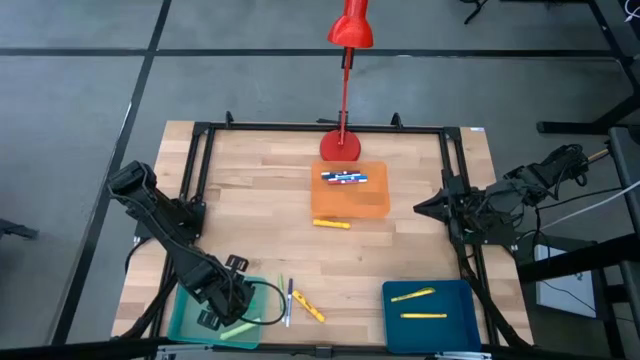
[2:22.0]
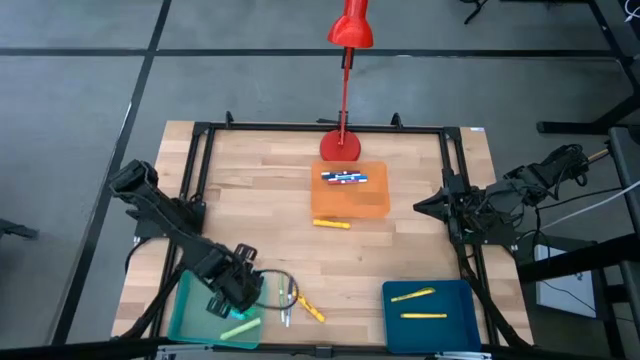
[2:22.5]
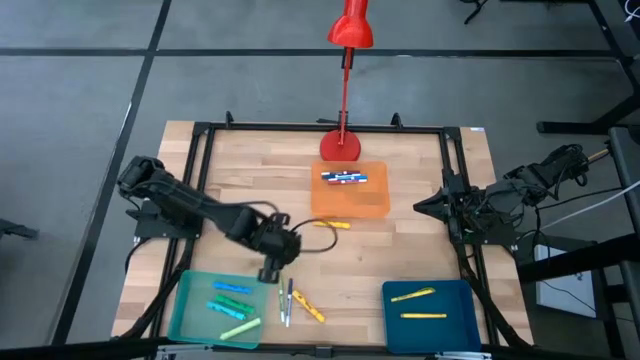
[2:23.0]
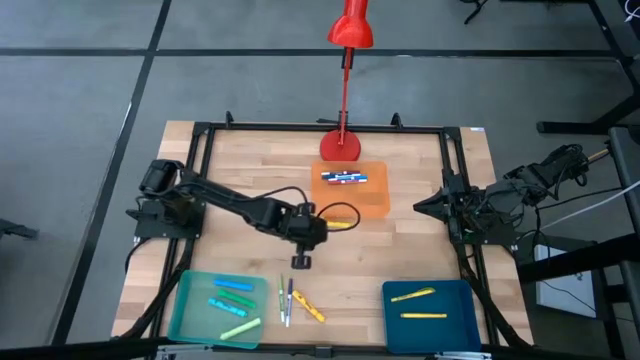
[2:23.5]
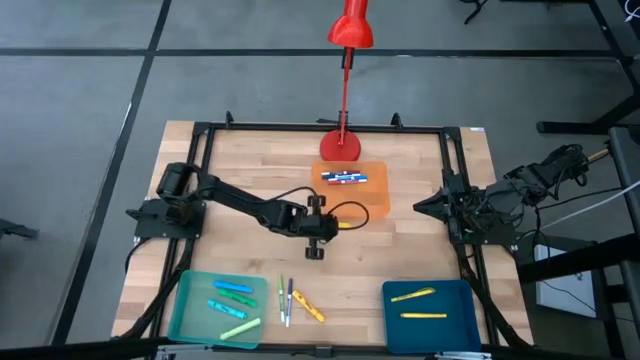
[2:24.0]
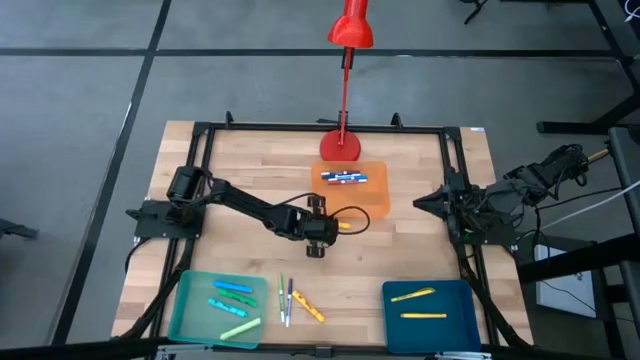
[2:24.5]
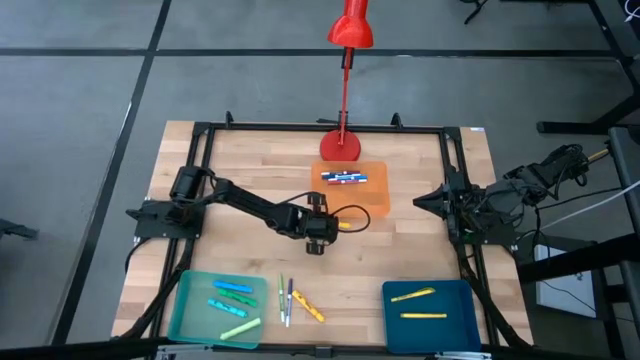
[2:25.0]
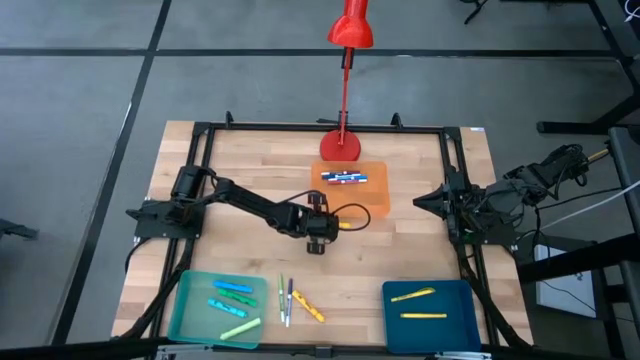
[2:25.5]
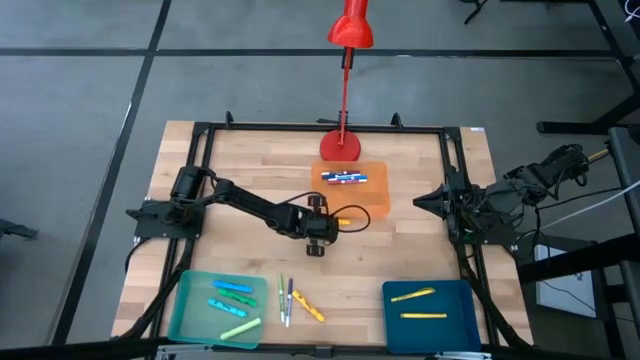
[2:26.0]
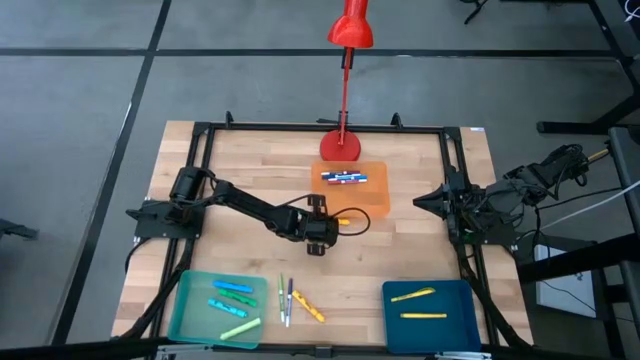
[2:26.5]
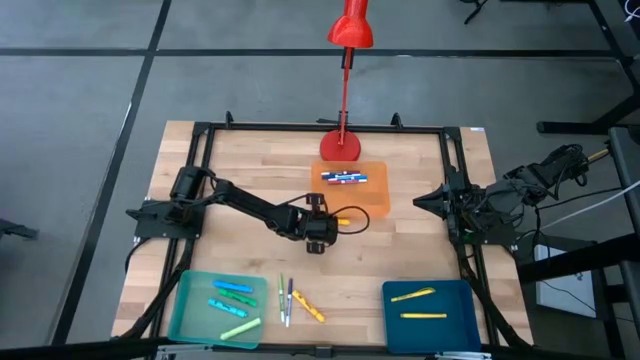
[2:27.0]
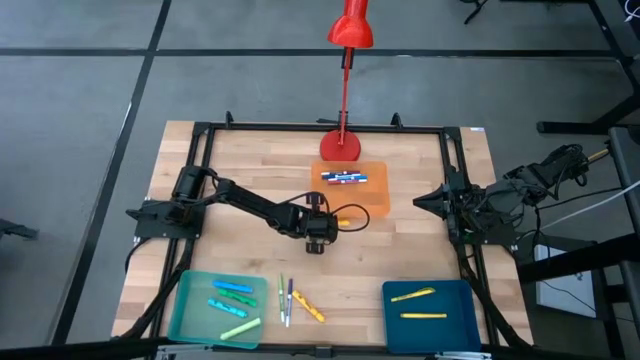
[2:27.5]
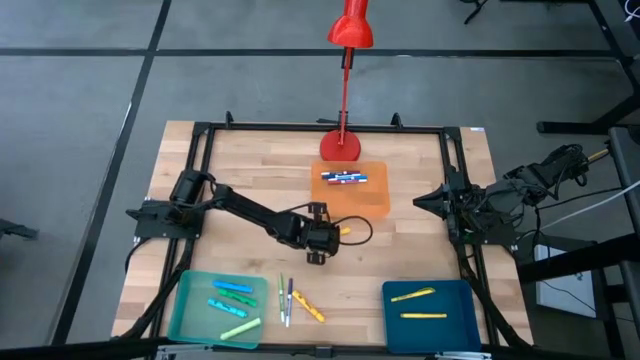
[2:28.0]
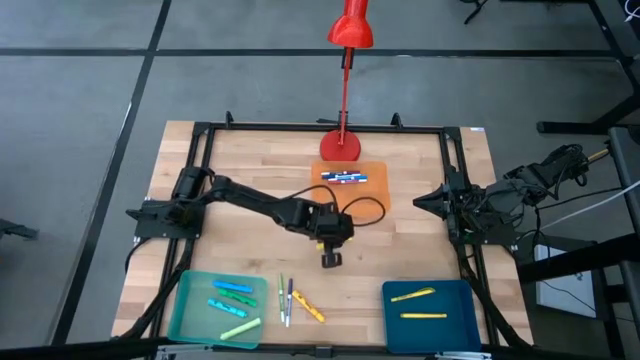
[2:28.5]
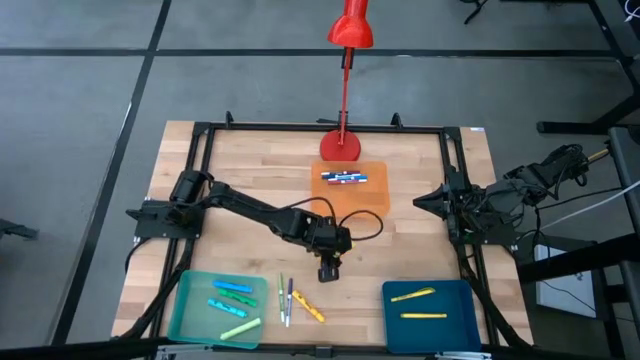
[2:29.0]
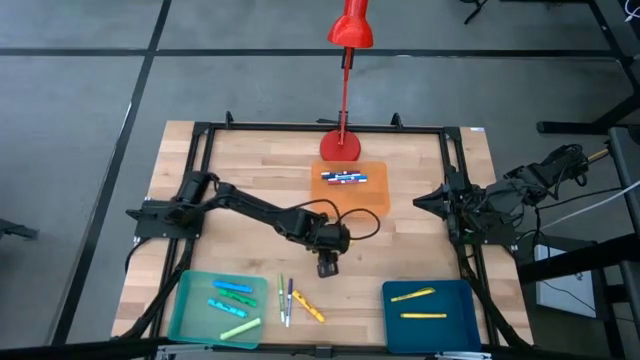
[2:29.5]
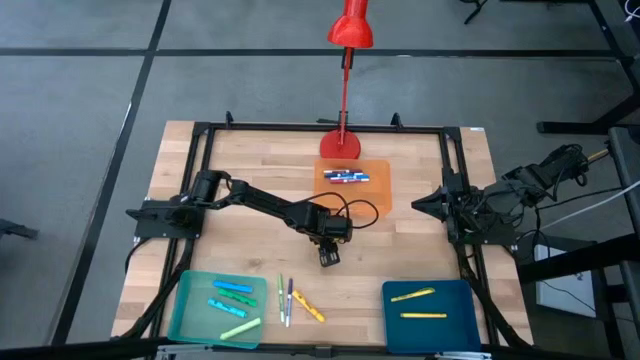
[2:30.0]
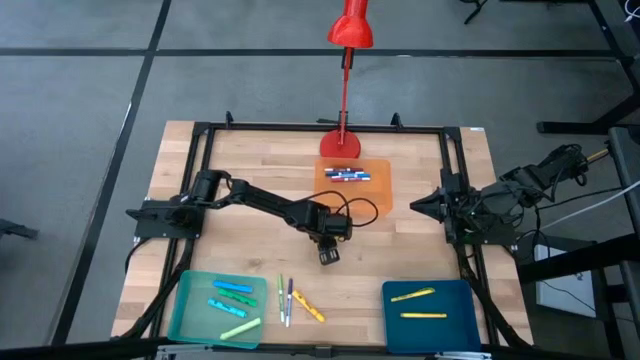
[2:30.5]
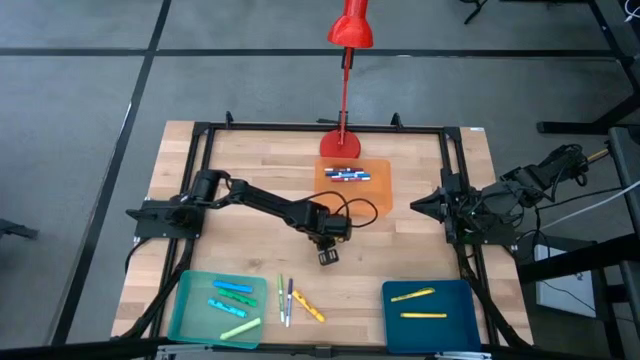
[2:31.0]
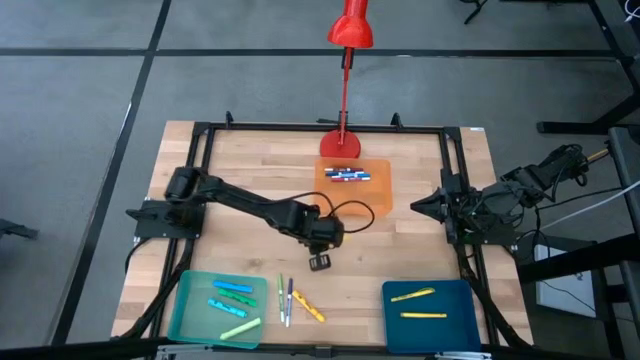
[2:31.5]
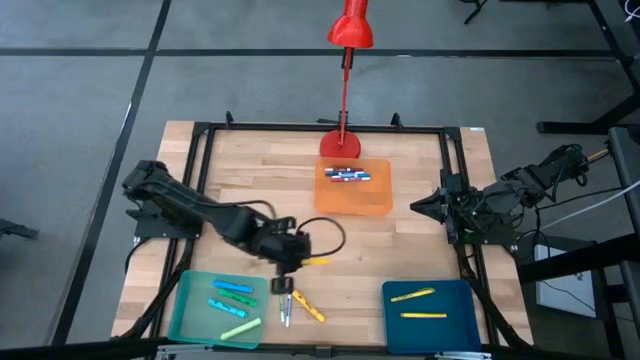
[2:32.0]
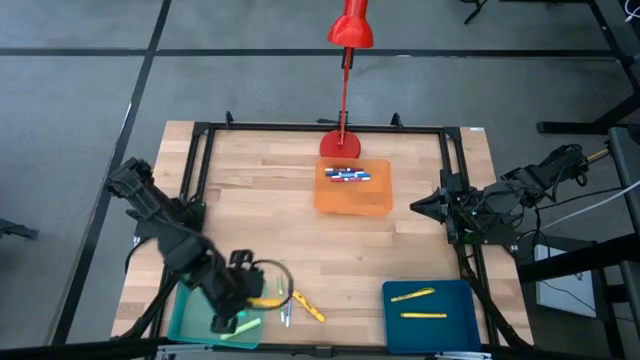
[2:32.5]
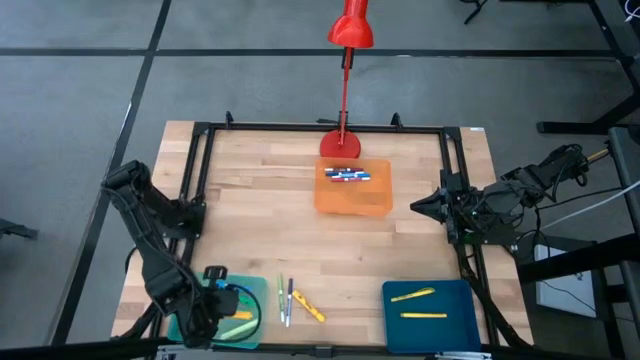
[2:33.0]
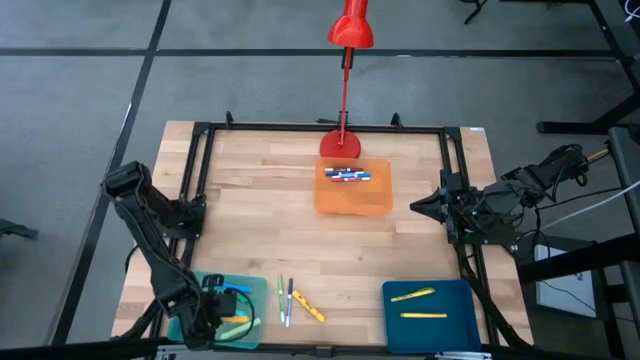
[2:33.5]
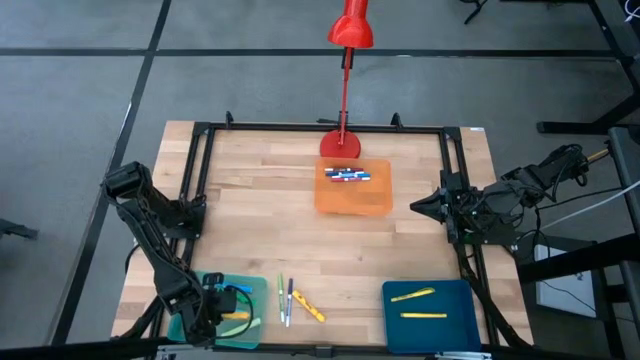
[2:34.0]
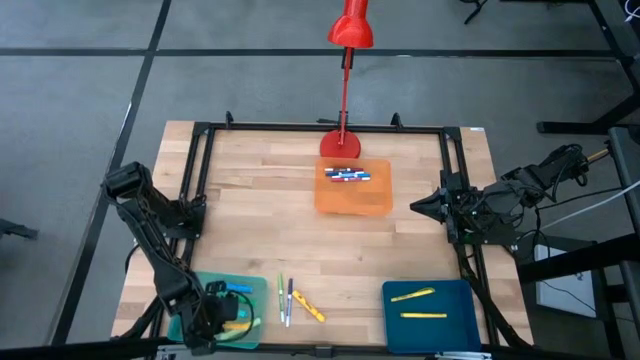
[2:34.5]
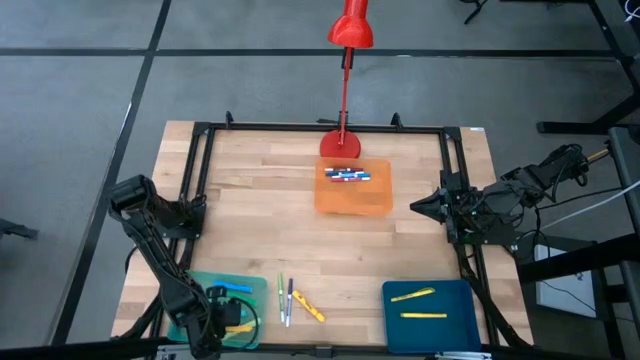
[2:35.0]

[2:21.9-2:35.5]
Task: Pick & Place Markers
Put the top yellow highlighter pen into the green bin

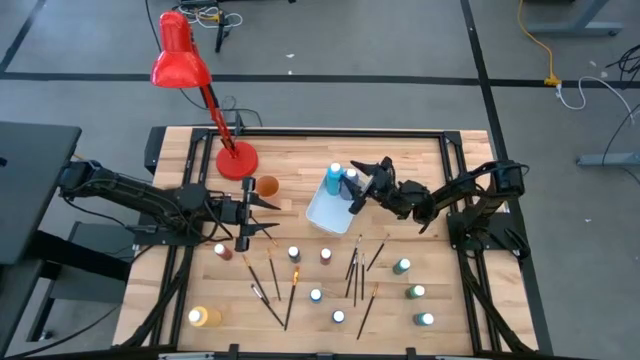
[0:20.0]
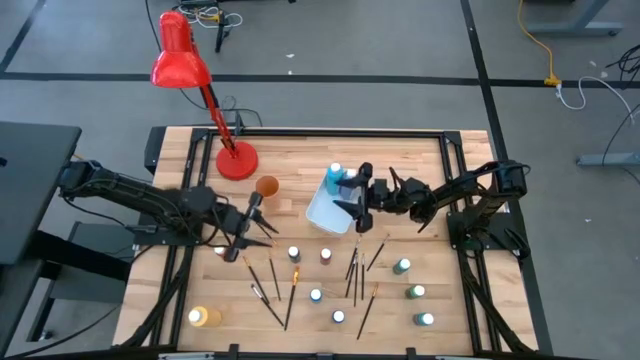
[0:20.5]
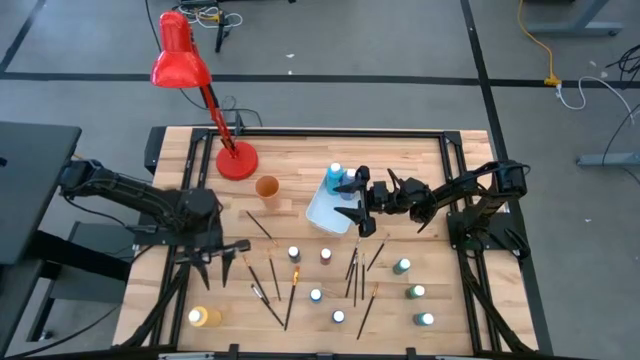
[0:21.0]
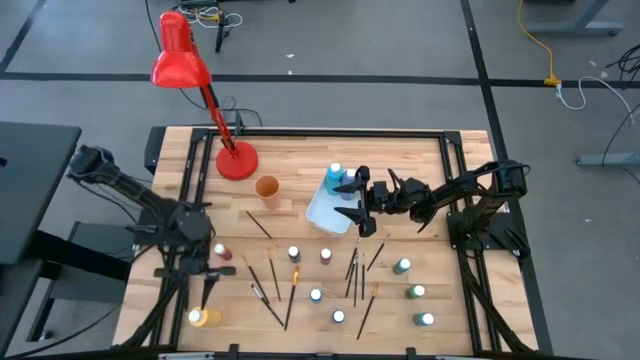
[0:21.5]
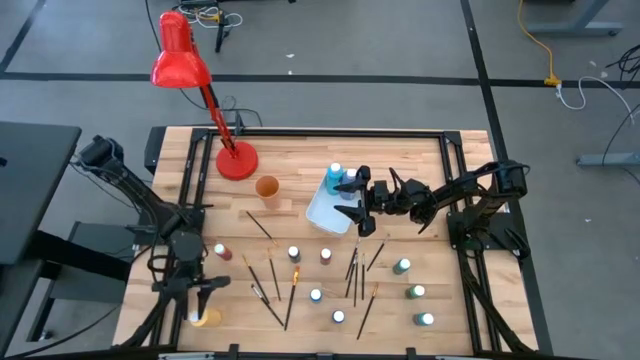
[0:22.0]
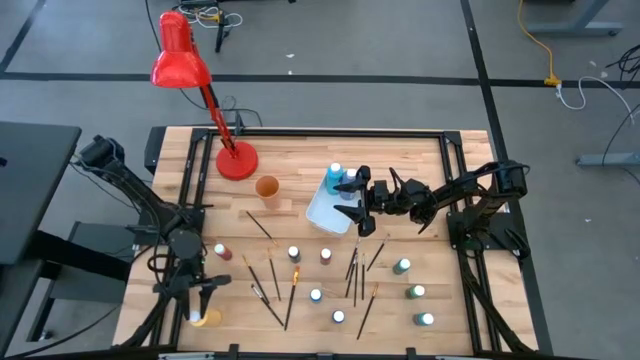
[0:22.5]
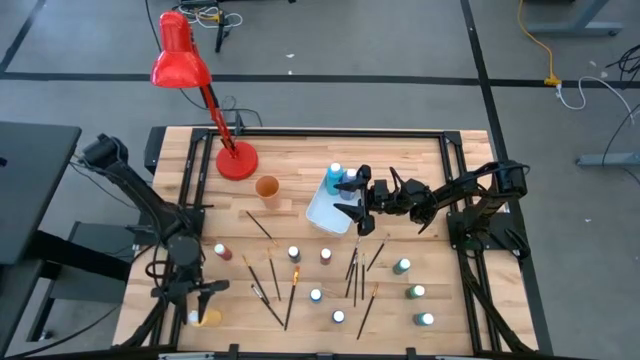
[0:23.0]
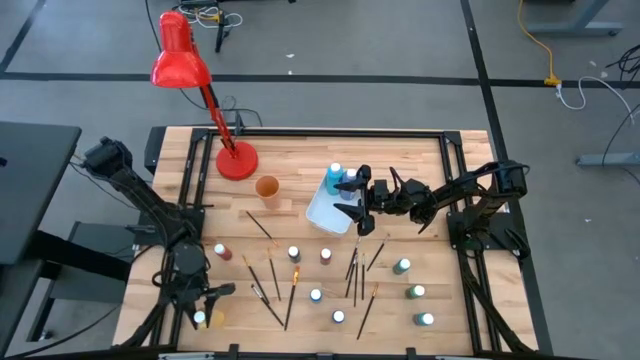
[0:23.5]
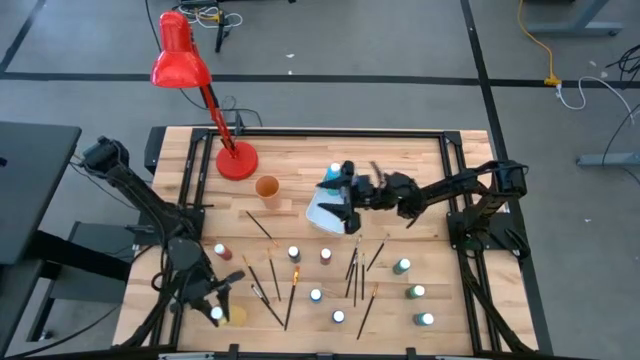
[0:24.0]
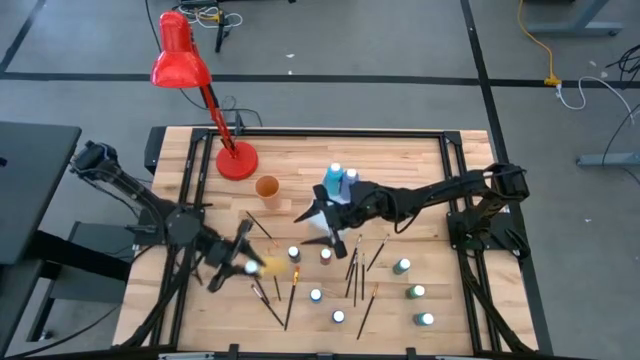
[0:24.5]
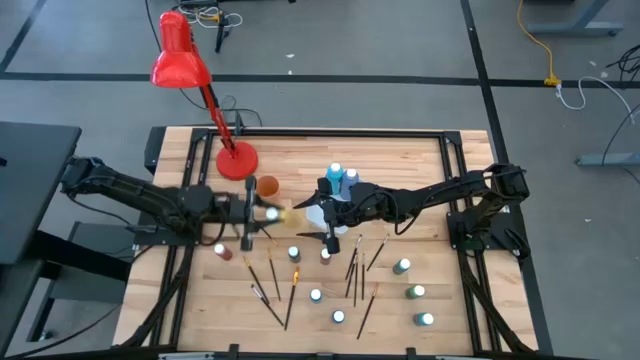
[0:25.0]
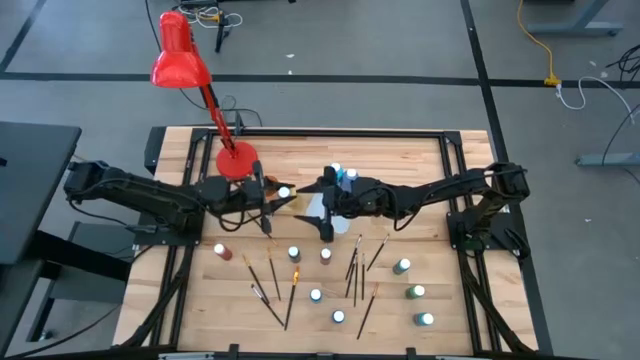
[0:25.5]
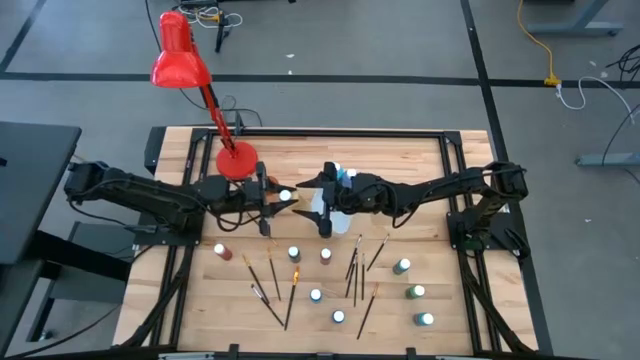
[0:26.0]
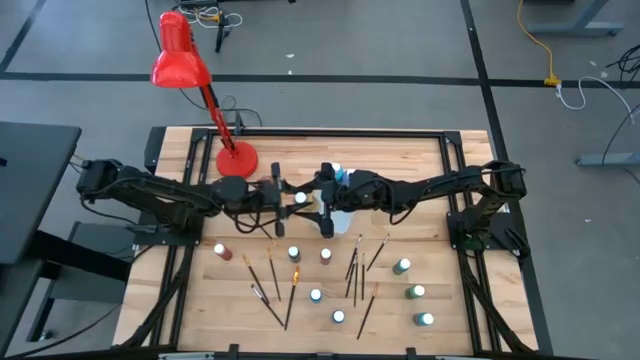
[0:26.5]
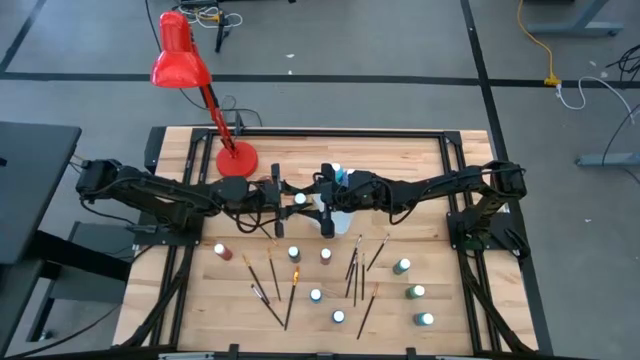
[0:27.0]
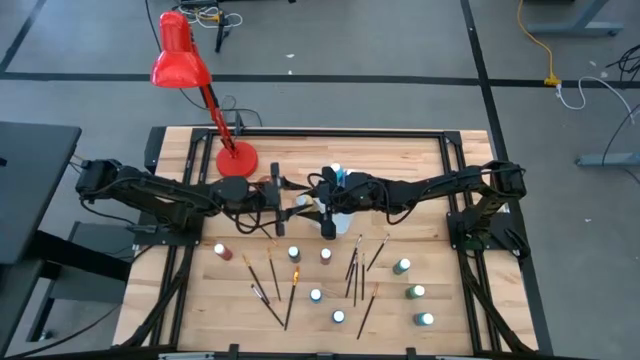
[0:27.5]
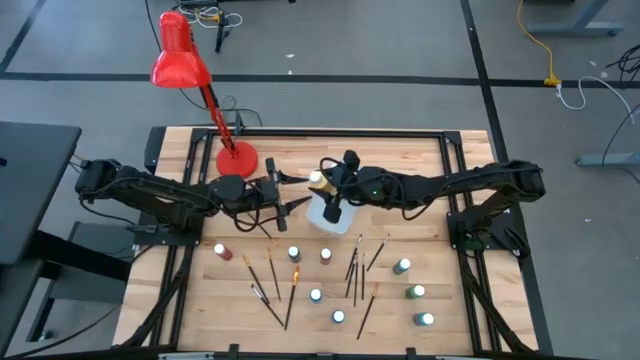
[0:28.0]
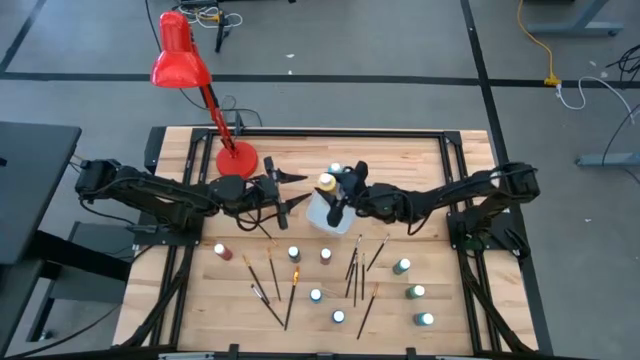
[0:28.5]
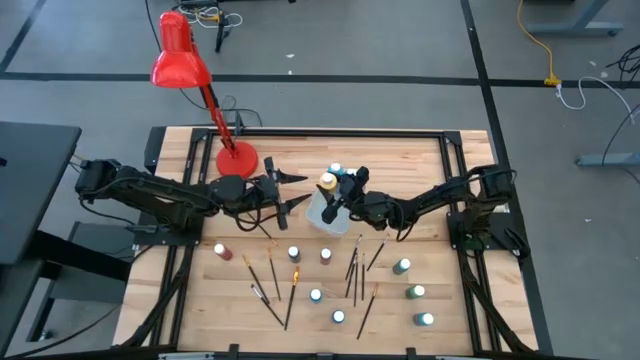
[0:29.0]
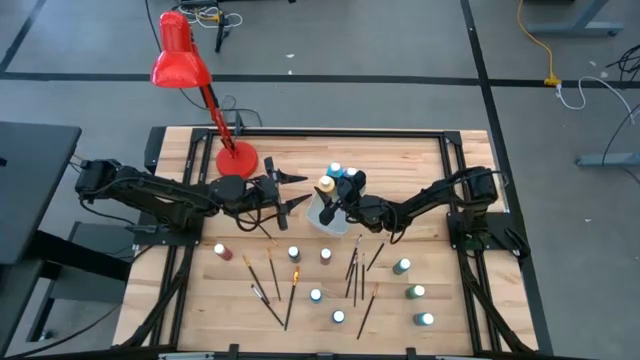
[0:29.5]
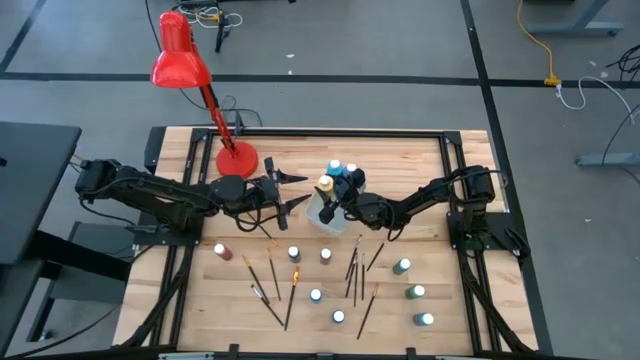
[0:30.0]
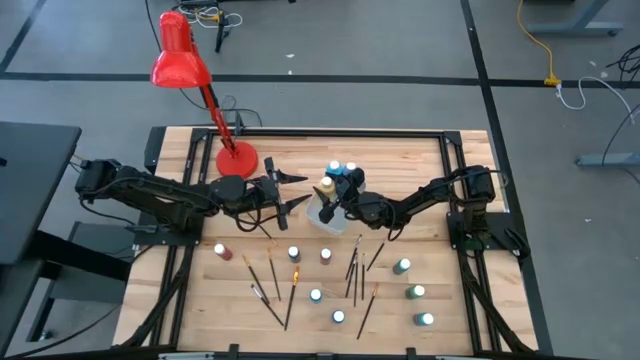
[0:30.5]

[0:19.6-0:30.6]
Task: Pick & Place Paint Supplies
Put the large yellow paint bottle into the white bin
